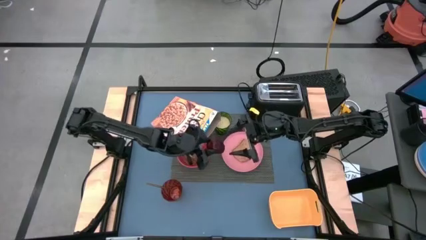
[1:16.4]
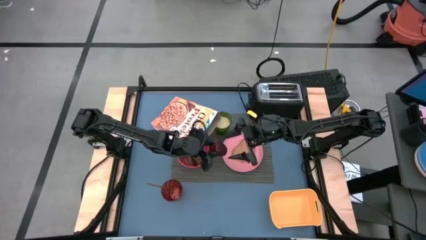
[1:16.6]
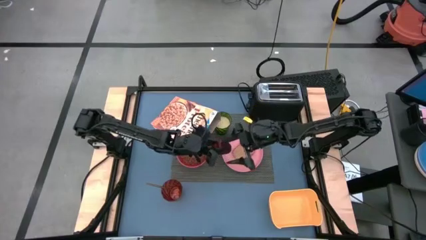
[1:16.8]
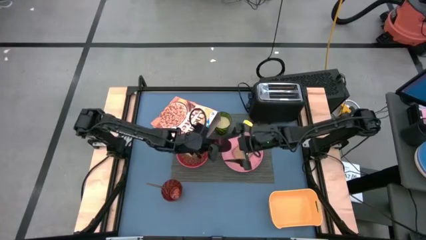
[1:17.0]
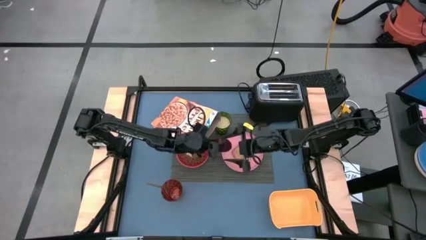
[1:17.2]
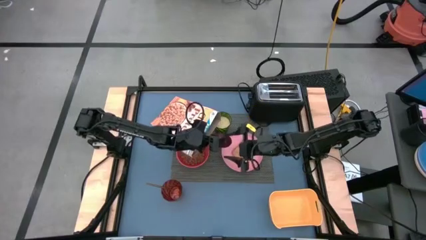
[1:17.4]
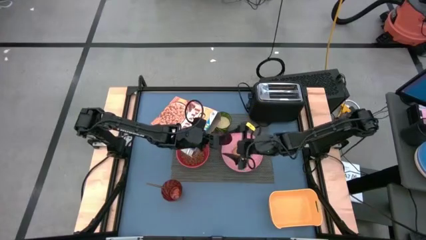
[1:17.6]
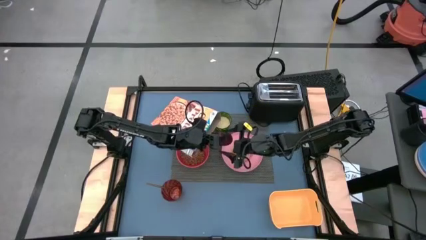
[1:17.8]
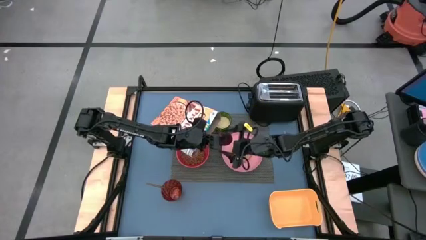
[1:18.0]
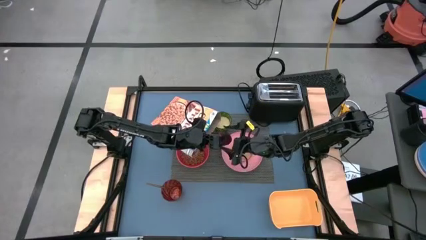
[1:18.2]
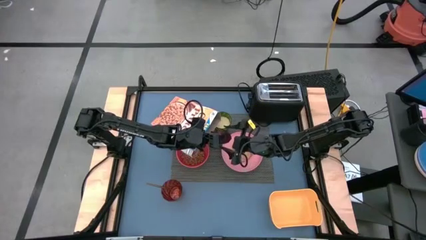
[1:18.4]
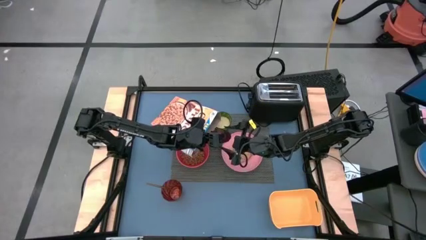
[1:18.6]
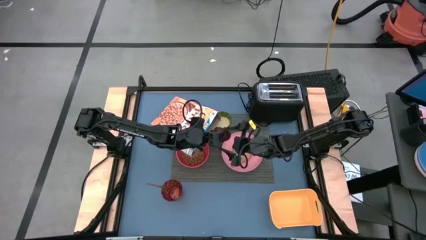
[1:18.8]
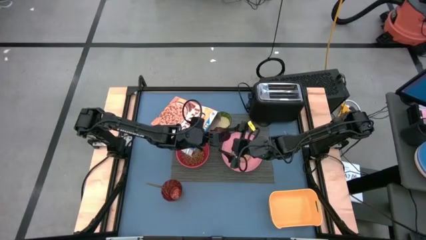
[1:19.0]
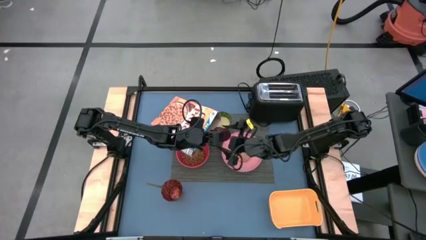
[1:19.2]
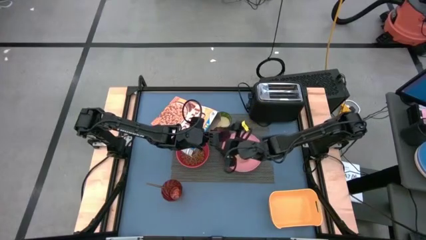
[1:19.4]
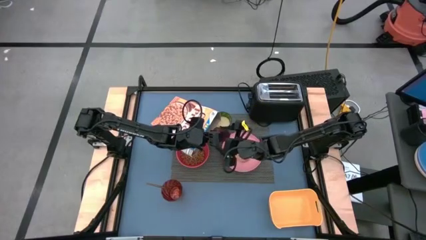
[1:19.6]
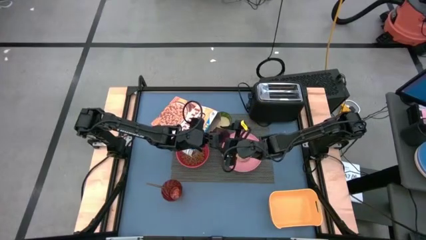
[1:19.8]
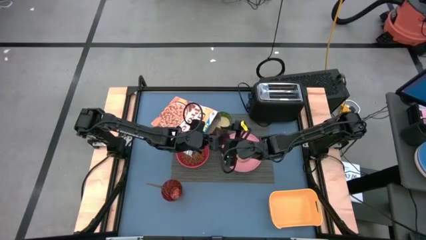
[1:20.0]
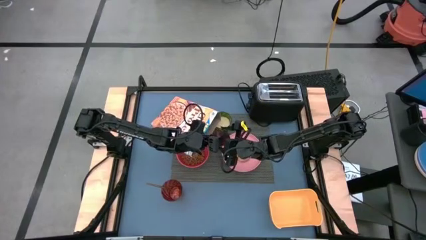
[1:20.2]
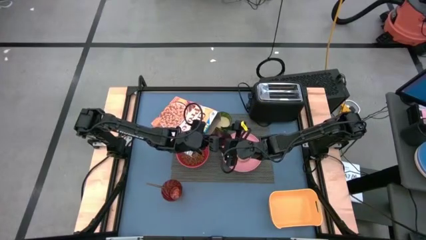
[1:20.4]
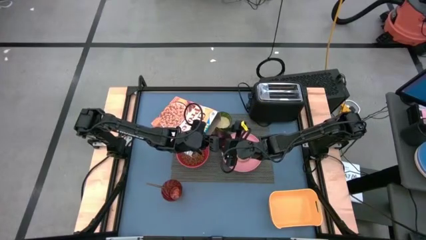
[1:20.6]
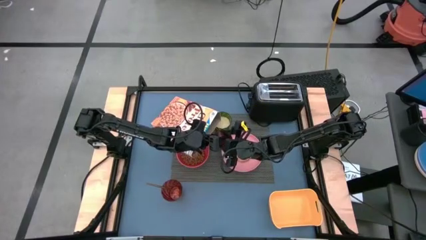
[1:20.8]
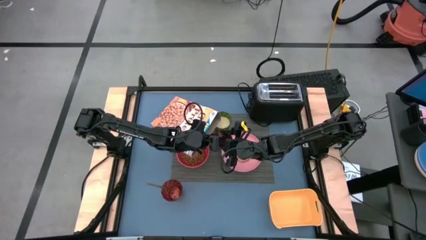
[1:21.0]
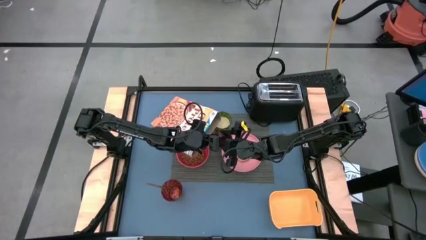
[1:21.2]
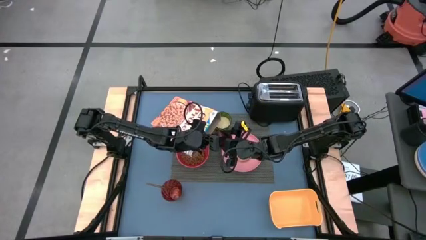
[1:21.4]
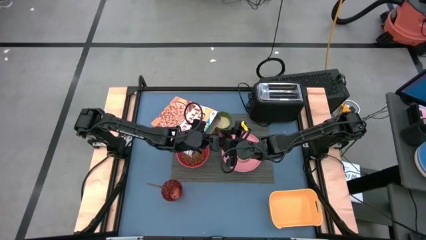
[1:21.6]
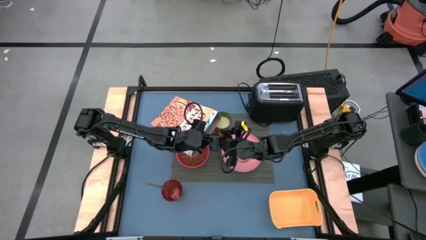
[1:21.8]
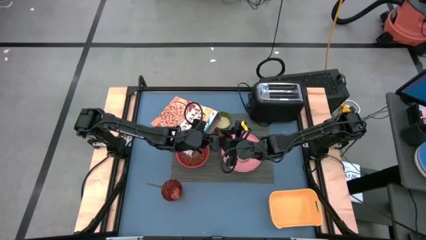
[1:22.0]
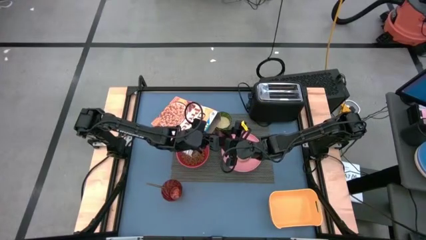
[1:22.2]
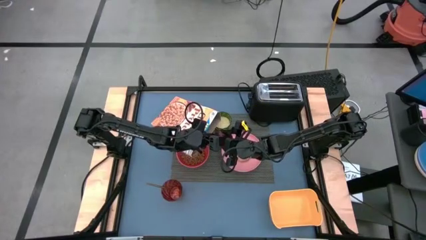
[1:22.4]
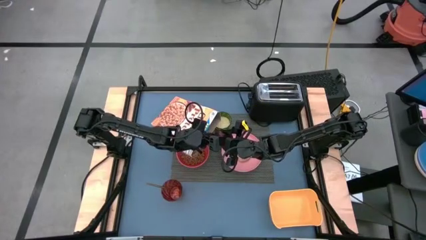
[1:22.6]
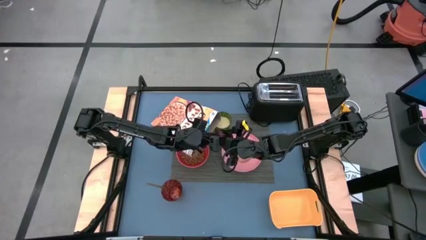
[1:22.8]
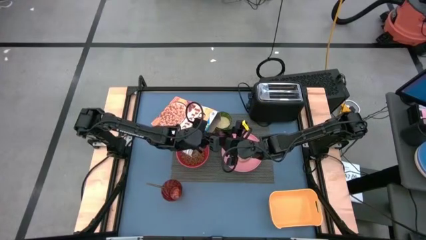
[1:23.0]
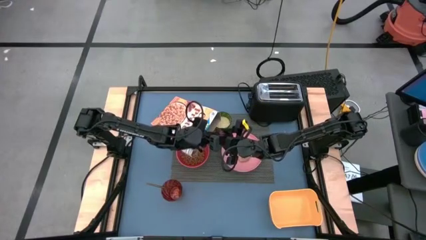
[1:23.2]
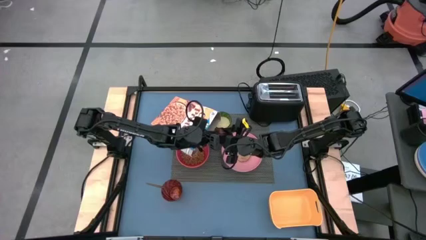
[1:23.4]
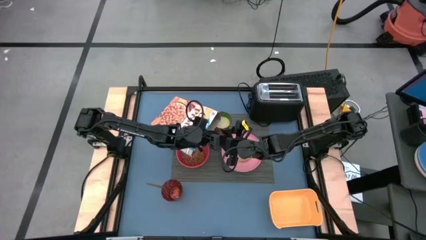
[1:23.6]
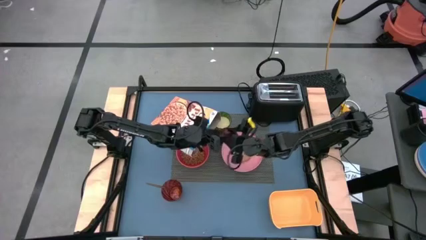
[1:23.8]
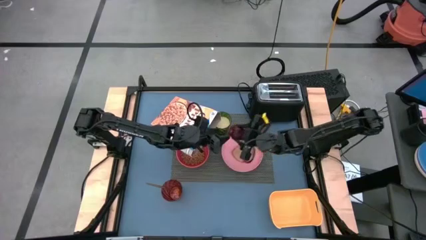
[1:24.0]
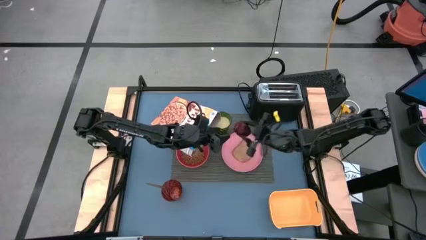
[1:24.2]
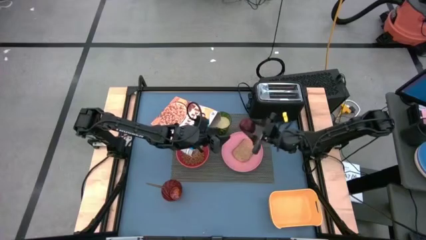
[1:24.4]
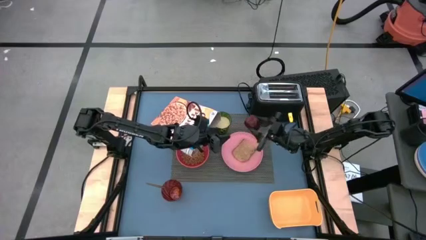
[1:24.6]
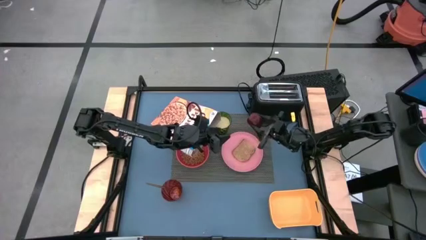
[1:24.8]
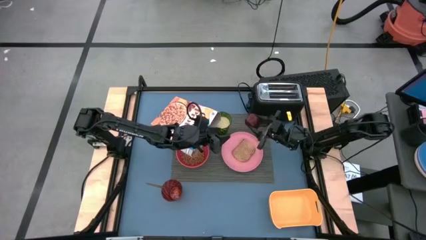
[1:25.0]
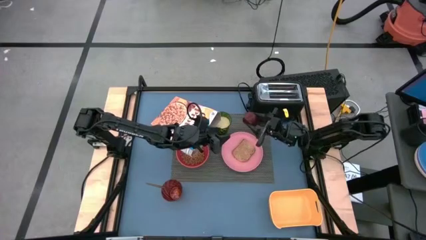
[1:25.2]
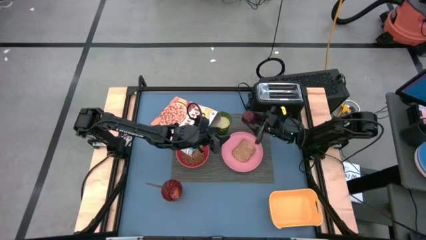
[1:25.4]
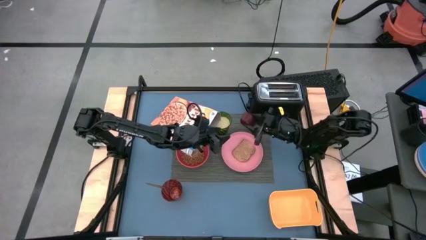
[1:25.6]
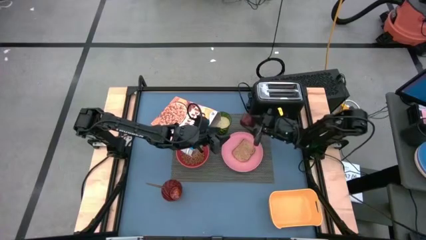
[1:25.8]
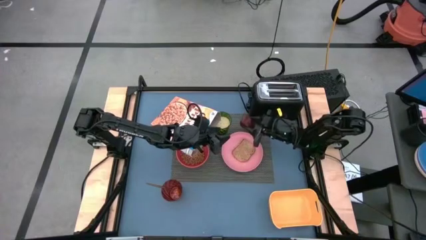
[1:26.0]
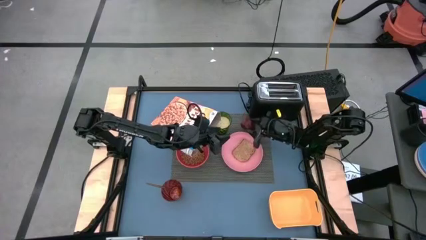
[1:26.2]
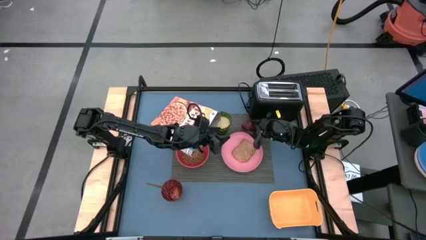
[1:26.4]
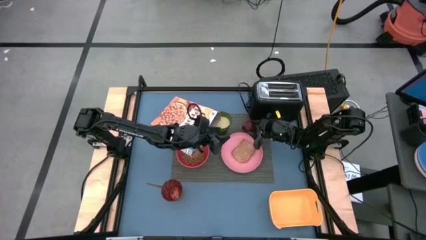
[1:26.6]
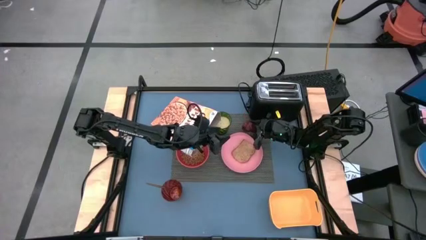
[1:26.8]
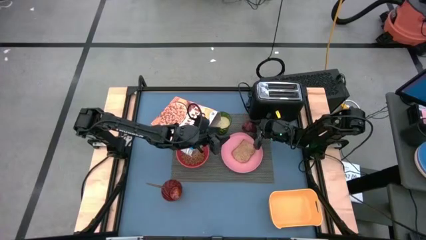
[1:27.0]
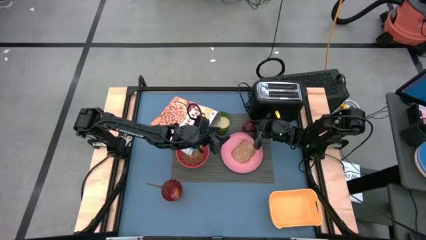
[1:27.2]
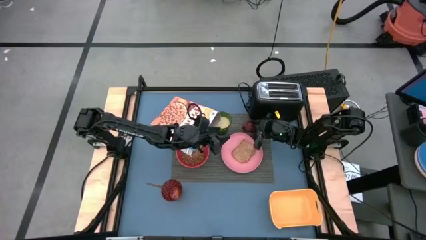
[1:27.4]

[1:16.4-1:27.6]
Task: Arrange a breakfast setting
Put the apple on the placemat above the pink plate
